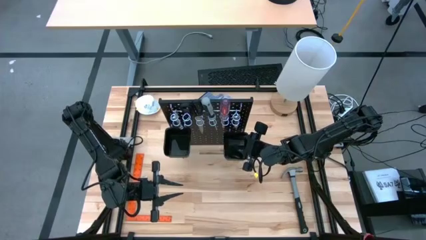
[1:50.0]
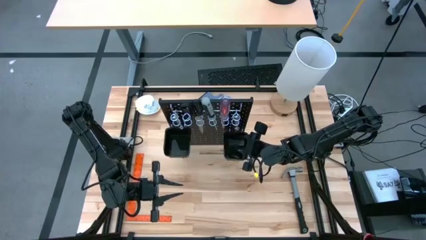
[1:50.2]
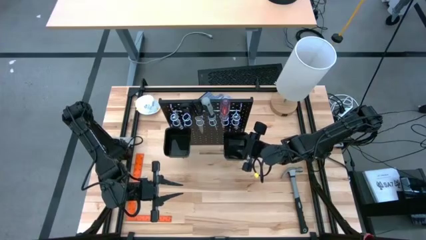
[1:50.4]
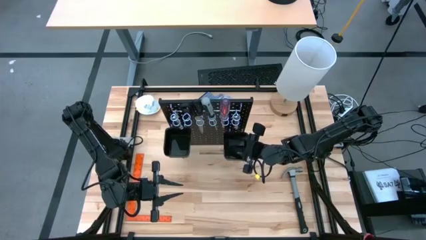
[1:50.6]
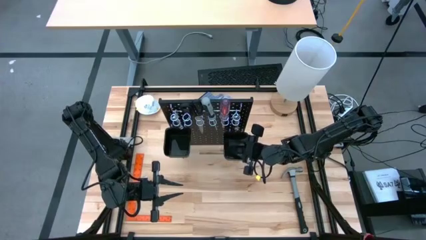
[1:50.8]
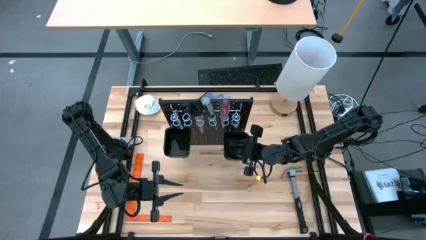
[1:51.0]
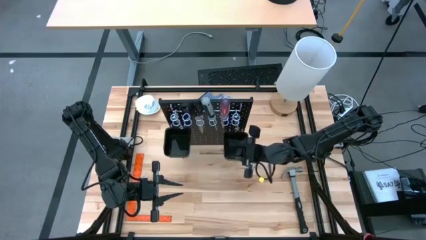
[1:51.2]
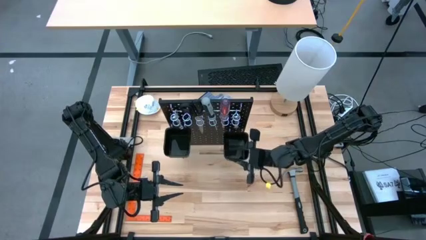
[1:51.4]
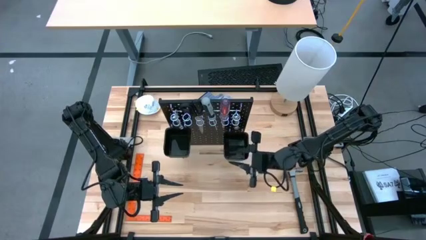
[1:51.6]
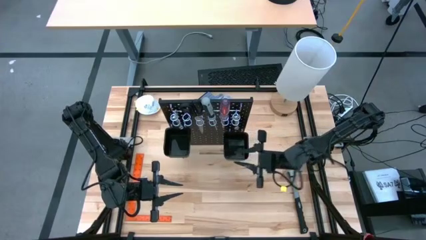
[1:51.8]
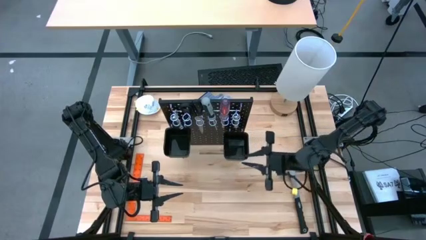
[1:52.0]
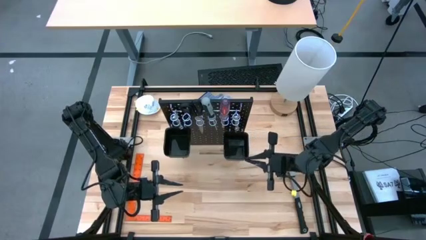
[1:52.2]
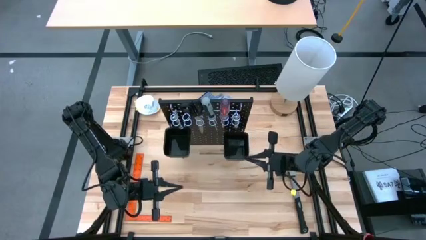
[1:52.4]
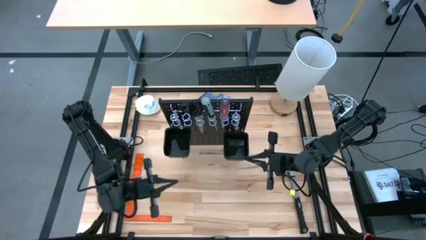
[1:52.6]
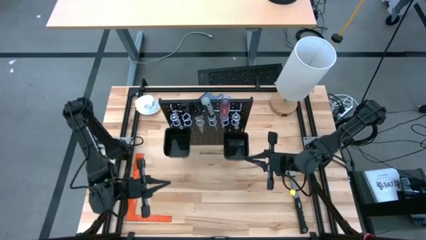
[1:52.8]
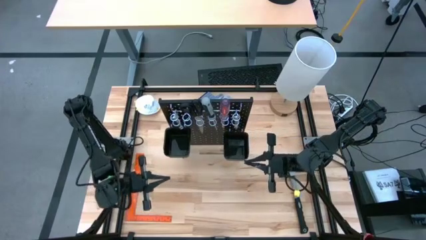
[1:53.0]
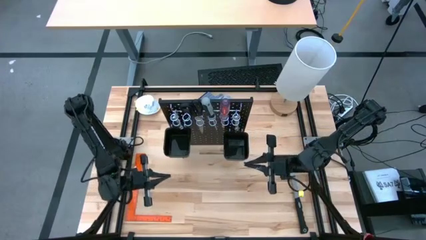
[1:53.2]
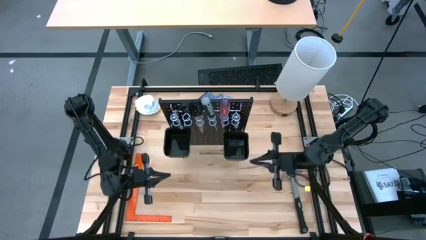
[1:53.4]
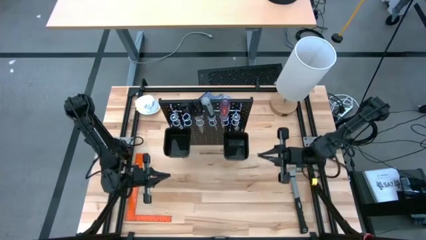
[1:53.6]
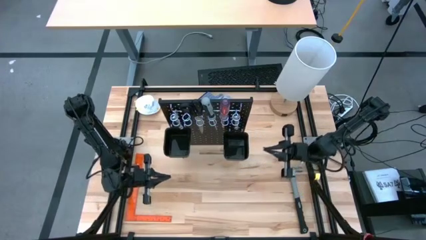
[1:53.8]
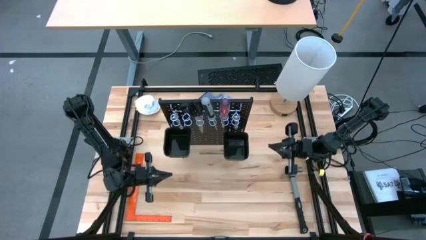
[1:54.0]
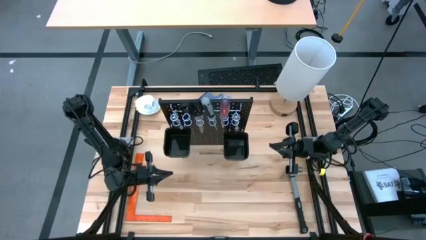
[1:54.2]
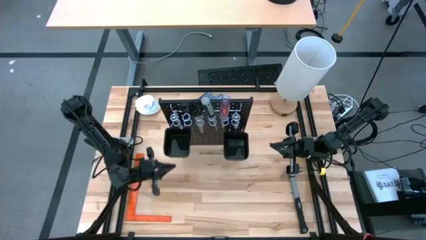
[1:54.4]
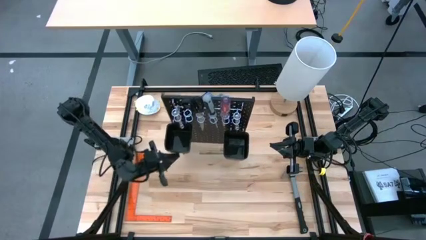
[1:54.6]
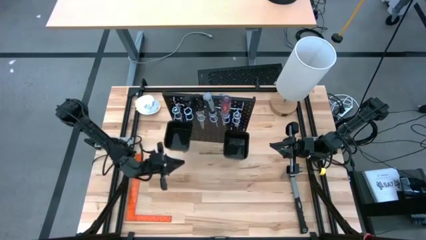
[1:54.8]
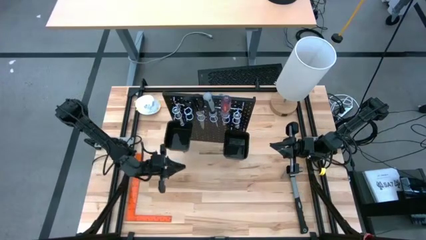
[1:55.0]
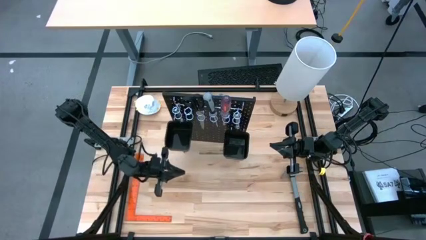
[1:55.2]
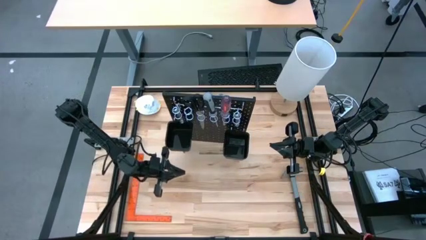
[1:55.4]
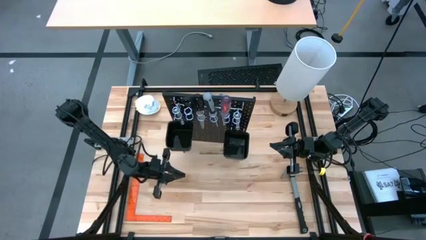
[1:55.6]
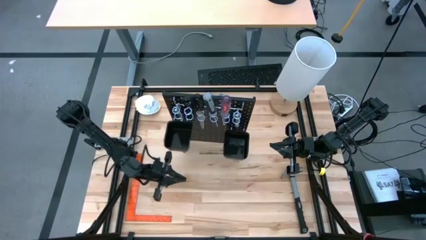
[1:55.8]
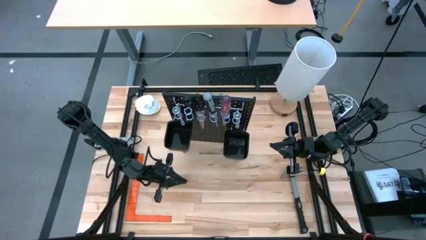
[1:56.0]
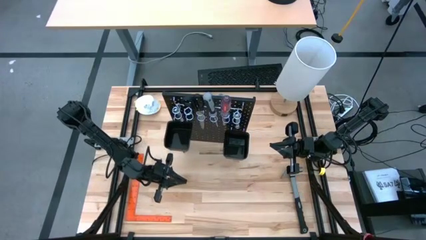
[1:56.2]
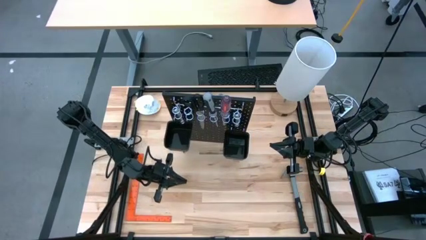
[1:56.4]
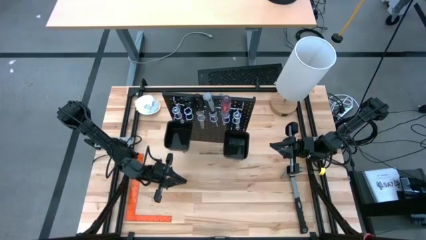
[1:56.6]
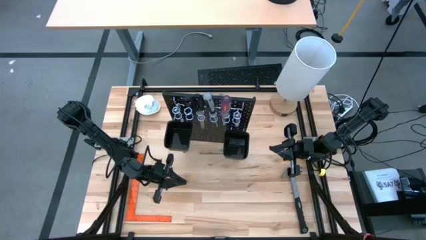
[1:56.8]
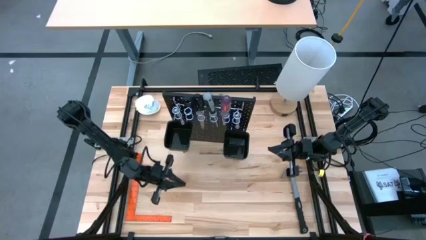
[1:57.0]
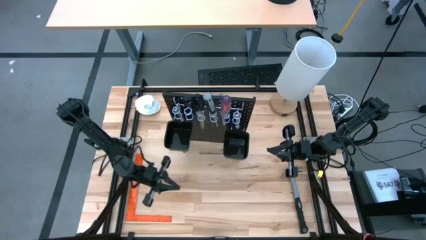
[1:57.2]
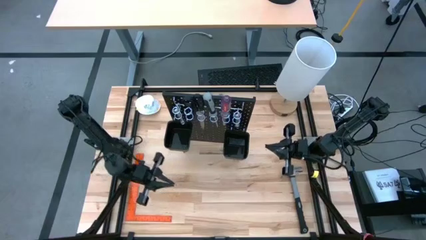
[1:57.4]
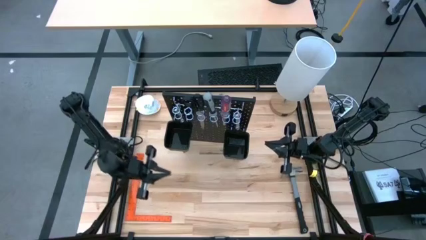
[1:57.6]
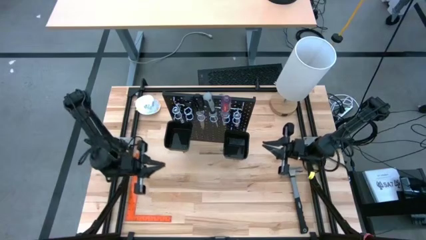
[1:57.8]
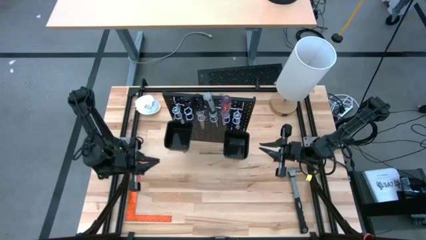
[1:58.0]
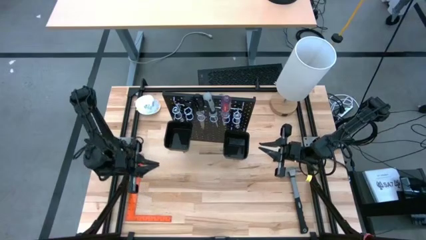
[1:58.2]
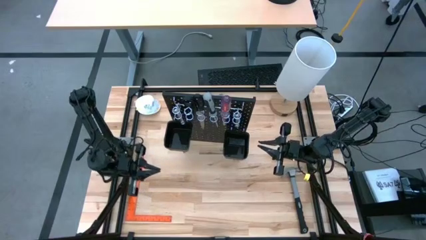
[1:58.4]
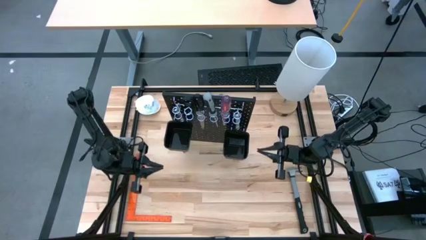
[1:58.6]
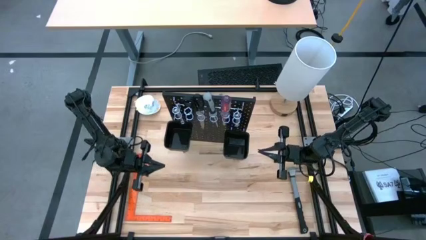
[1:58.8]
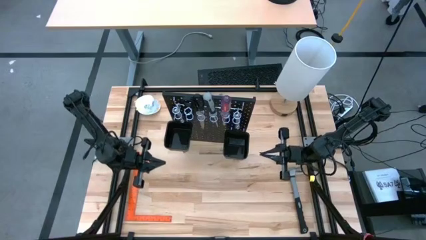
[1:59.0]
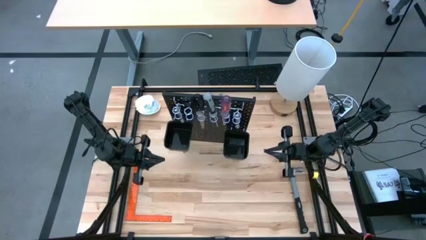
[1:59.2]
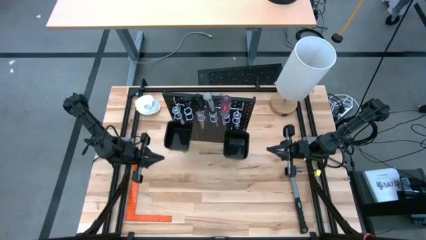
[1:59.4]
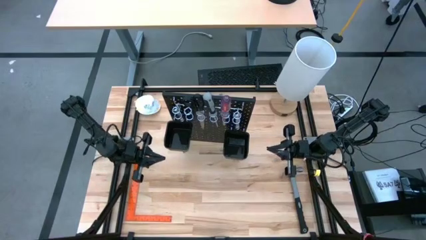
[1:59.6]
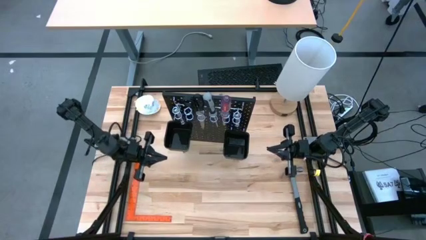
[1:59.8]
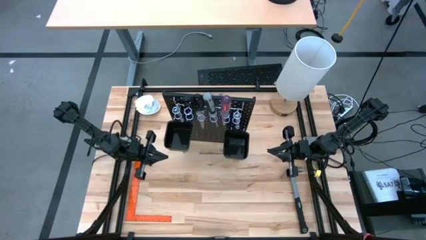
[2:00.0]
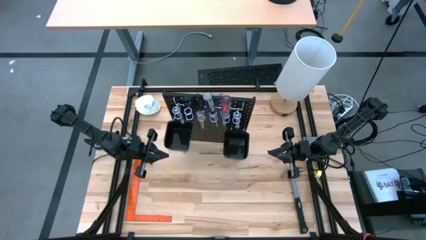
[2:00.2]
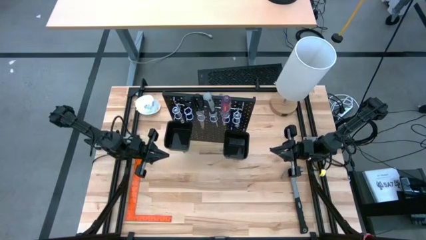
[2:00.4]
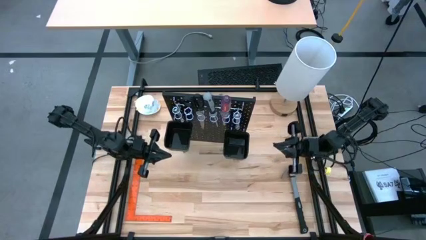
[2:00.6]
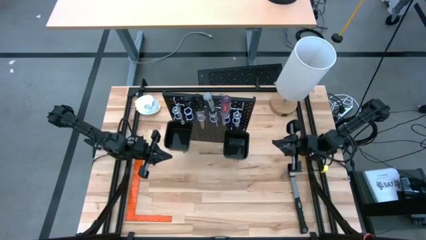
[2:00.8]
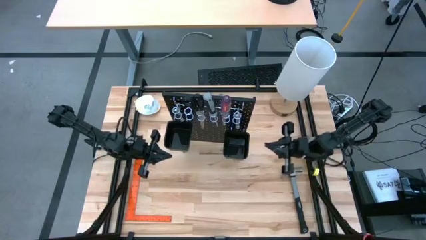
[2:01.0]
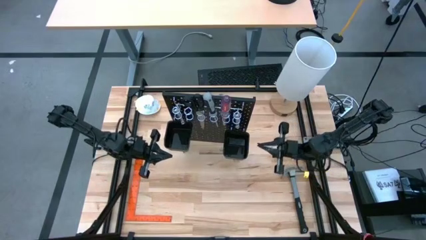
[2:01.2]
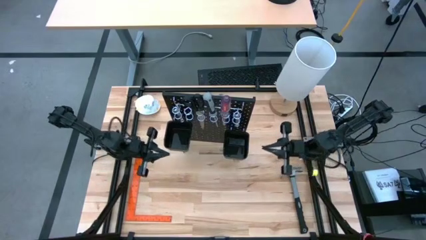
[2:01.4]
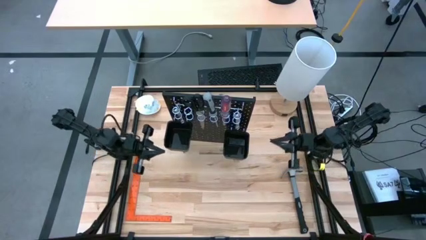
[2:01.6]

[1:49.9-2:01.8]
Task: Hang tools onto peg board
Remove the silver wrench from the black peg board

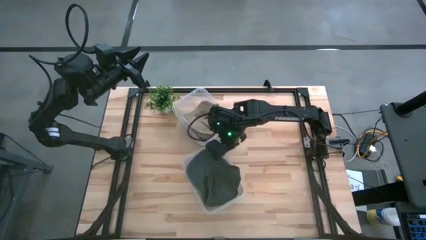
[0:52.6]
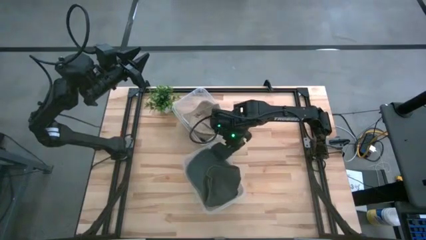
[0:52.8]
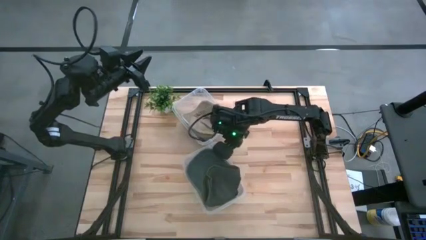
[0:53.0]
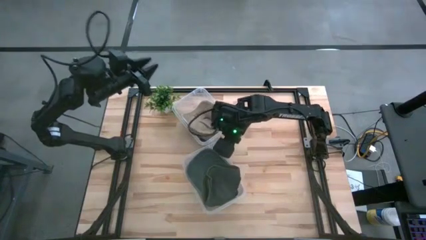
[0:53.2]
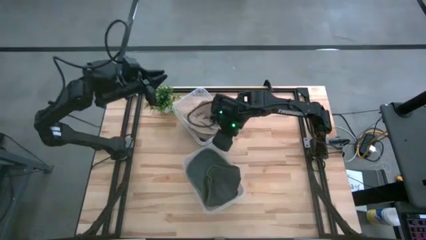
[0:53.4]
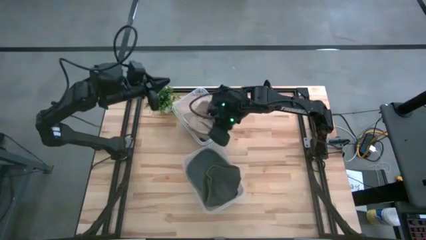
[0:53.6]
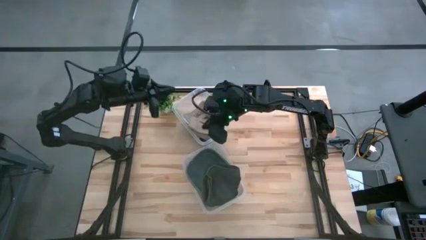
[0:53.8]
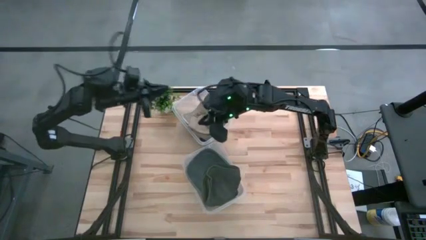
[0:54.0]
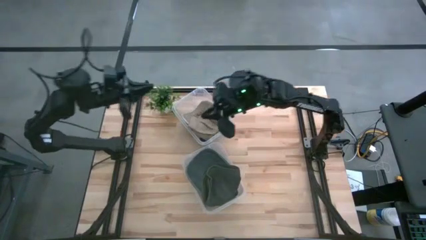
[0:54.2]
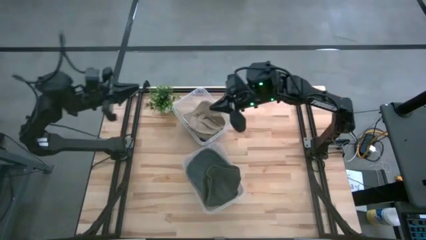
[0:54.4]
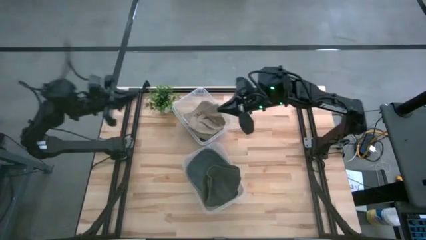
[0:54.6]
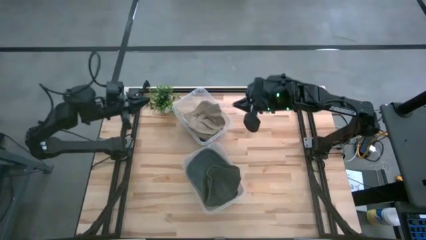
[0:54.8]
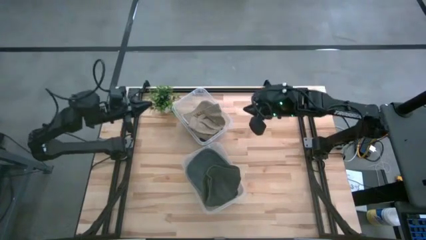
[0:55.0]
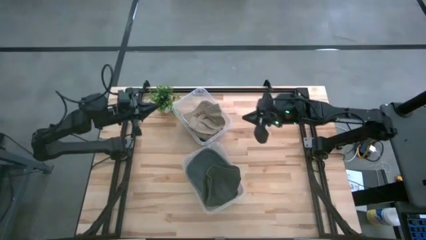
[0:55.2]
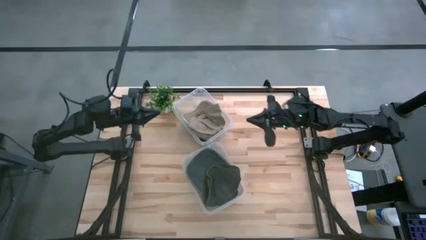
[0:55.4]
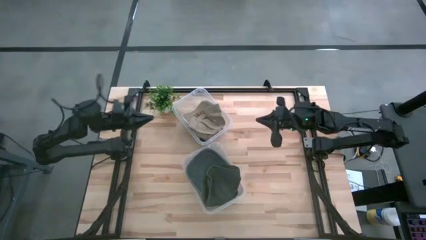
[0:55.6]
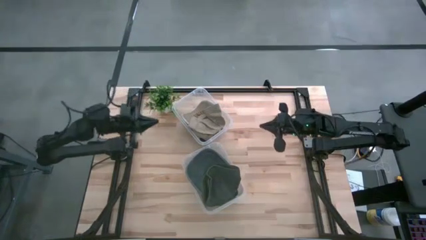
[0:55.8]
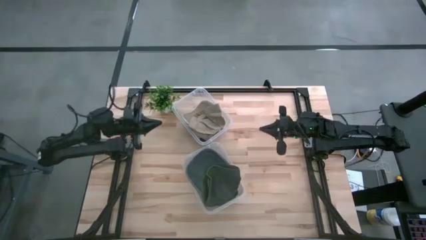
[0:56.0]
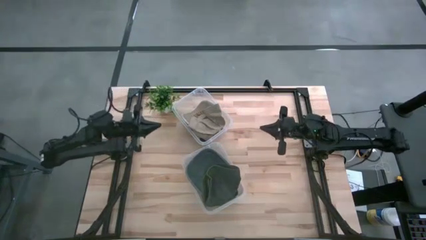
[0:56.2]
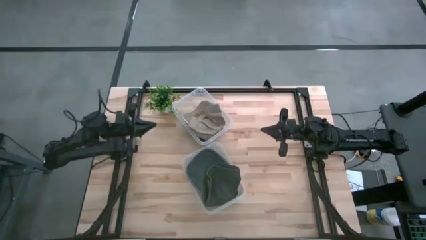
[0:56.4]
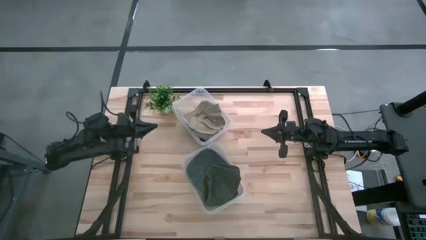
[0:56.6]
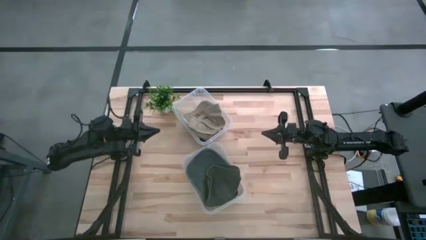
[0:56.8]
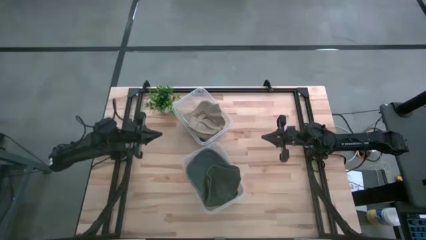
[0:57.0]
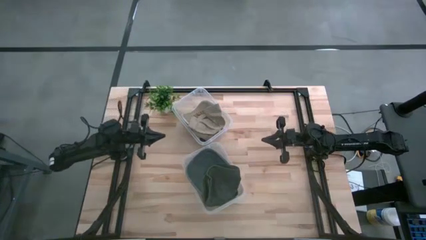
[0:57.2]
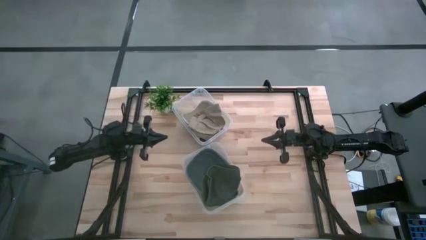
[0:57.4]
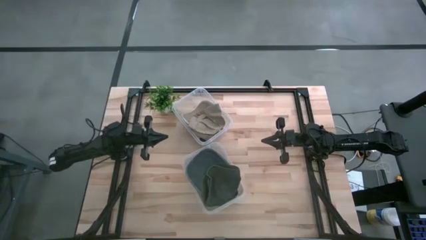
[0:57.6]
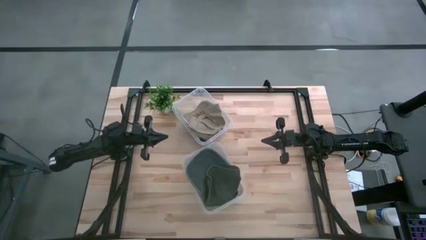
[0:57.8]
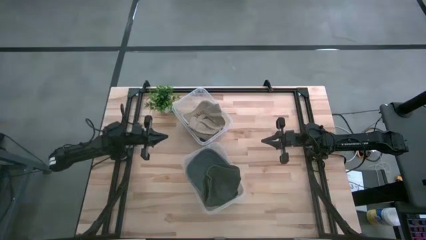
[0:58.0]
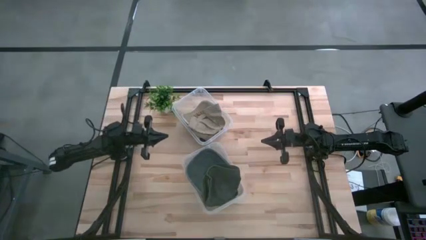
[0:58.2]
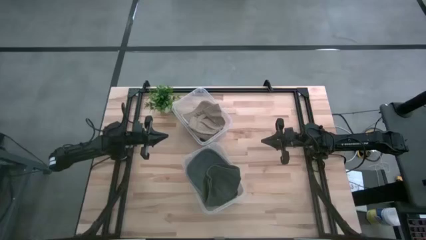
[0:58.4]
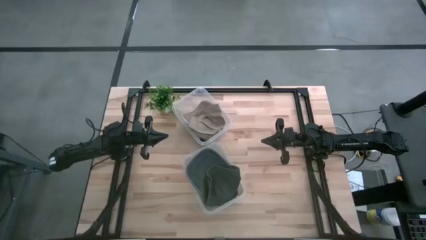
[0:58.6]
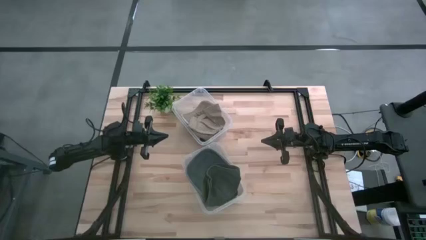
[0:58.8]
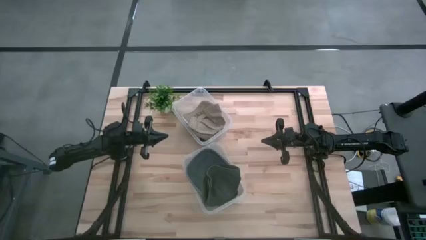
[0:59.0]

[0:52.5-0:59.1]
Task: Pick & Place hat
Return to Home Position
